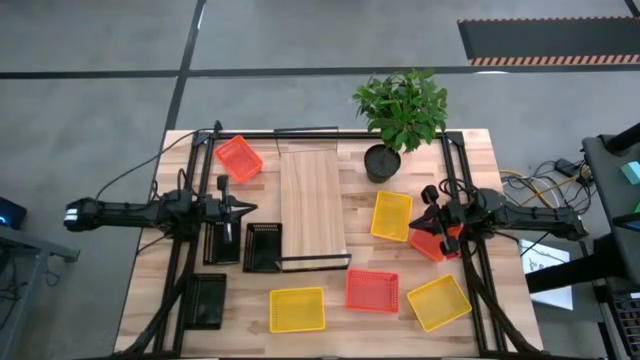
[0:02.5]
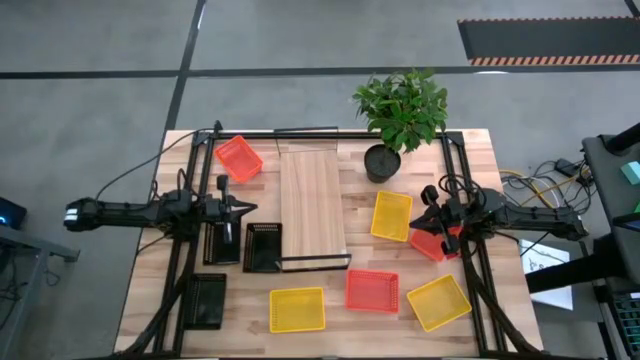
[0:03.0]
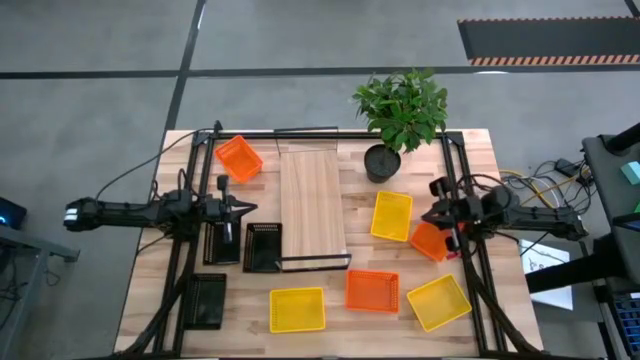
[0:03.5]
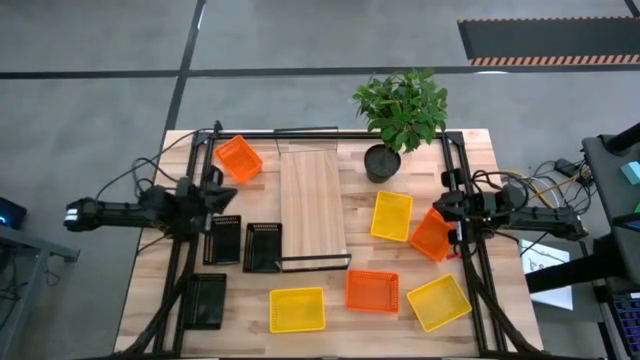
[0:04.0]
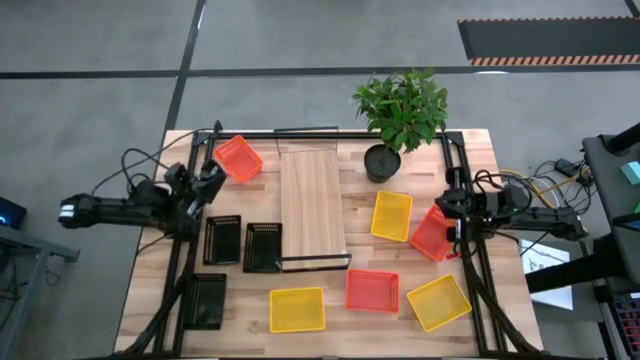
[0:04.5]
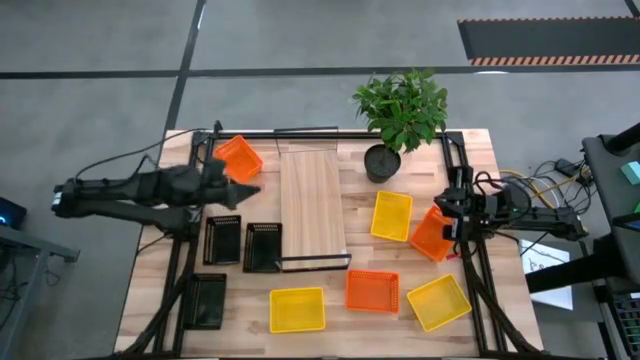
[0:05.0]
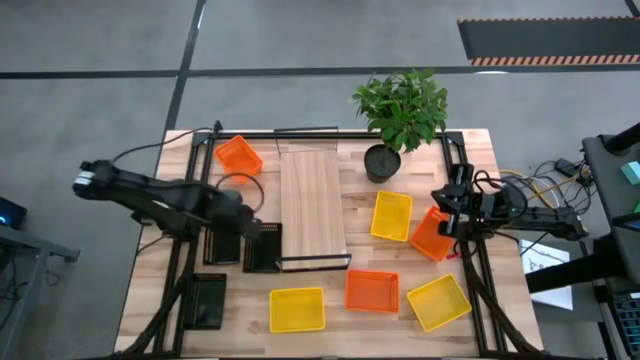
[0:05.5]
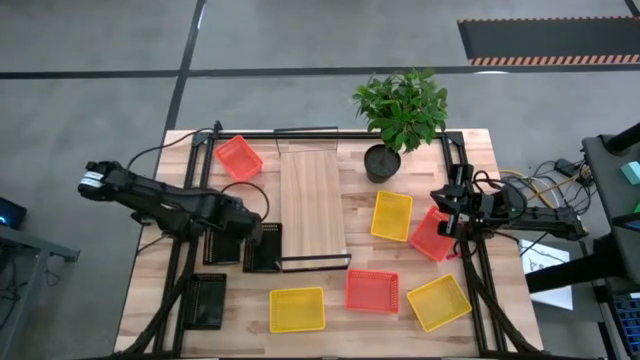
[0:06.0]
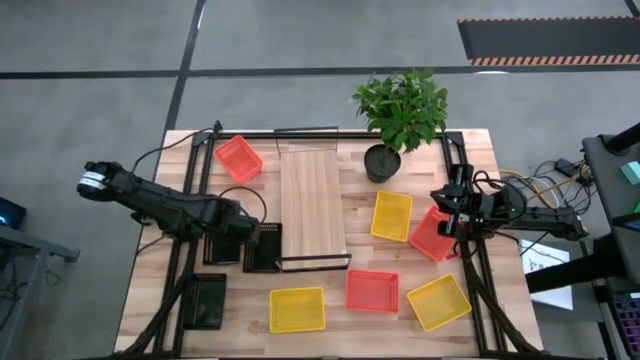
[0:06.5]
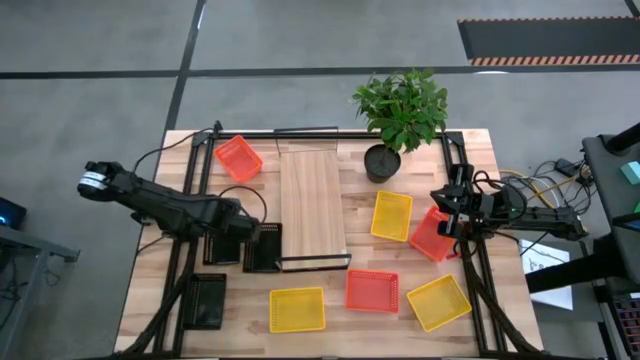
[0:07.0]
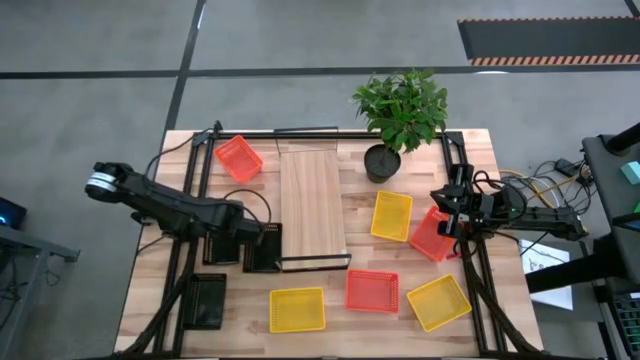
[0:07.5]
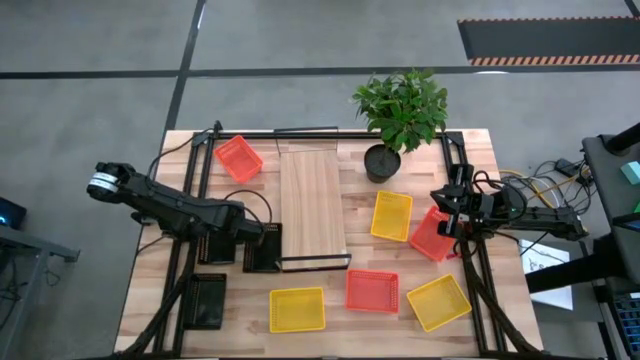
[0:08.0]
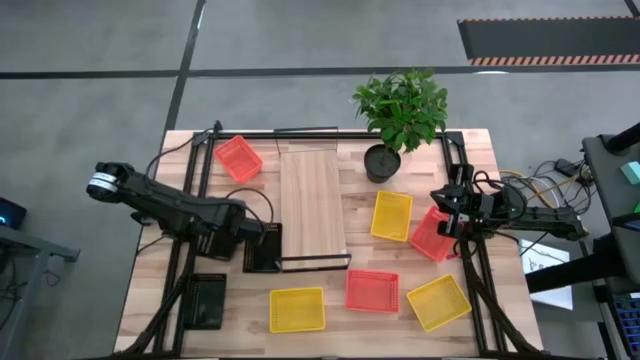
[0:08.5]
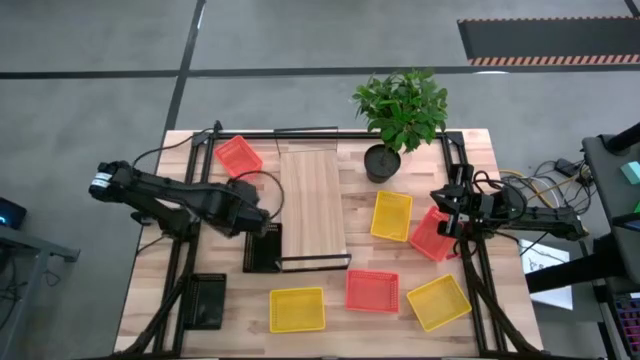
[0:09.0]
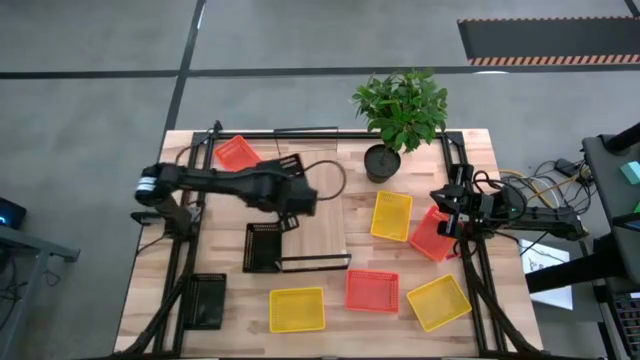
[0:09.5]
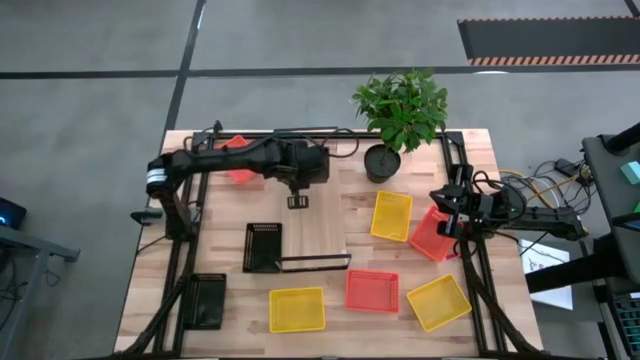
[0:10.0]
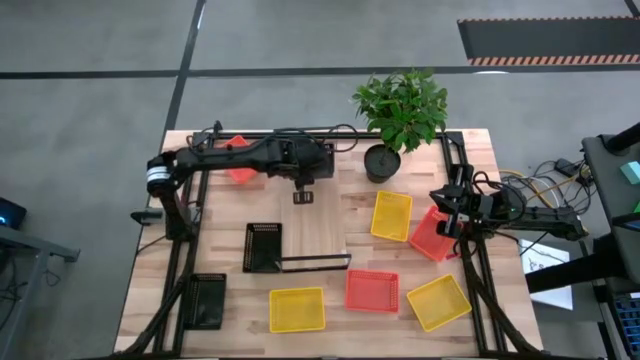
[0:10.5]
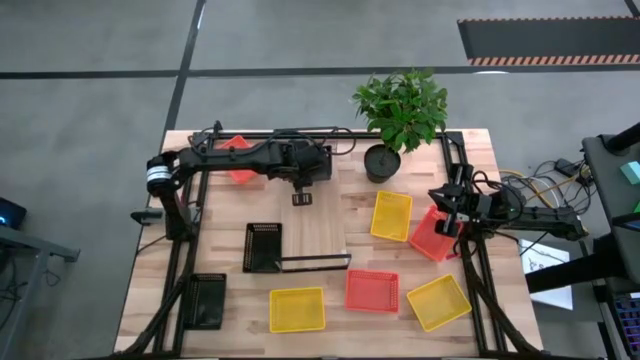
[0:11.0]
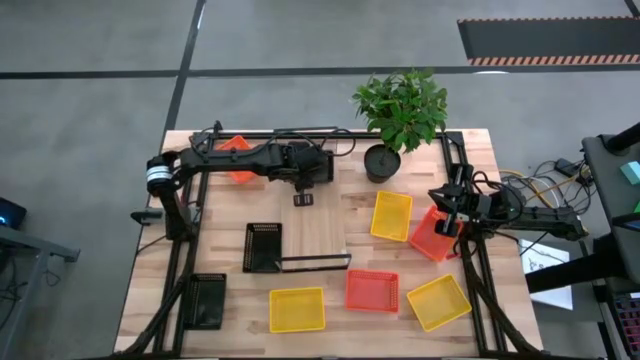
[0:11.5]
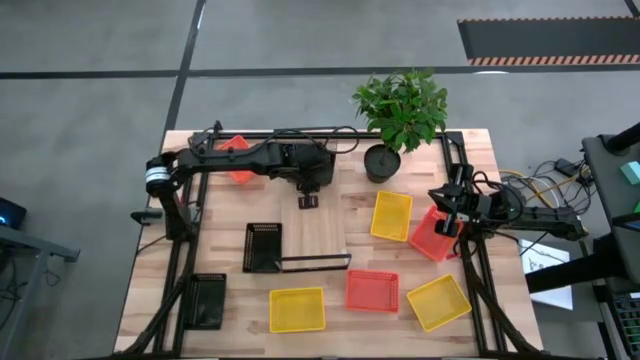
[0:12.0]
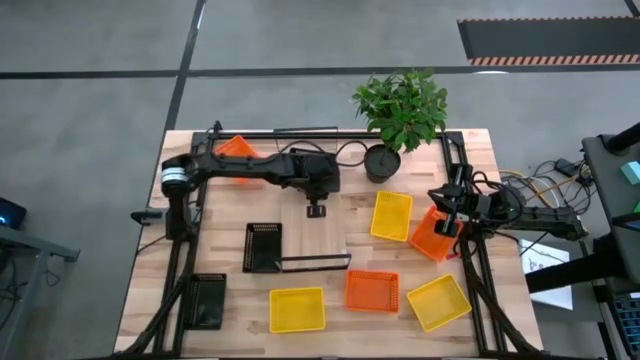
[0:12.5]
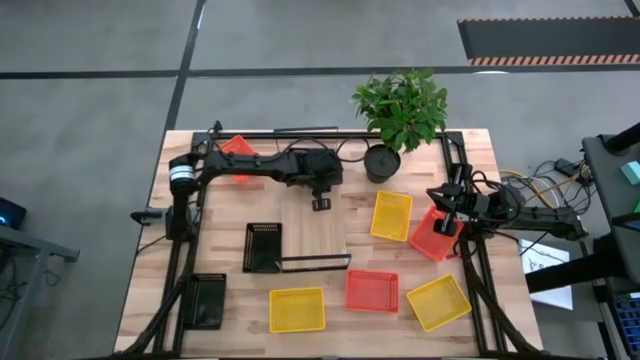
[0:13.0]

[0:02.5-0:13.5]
Task: Stack baskets on shelf by color
Put the top left black bin on the shelf

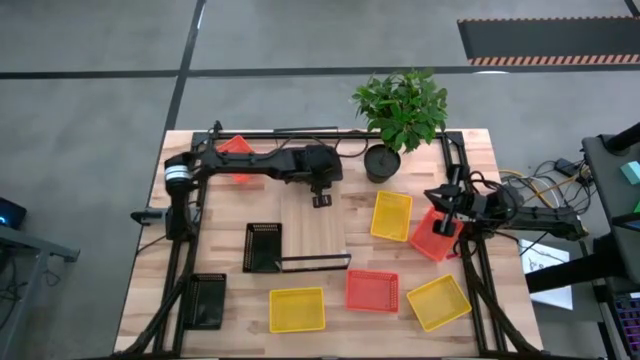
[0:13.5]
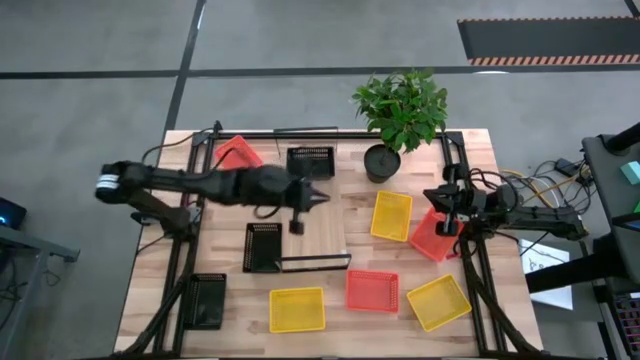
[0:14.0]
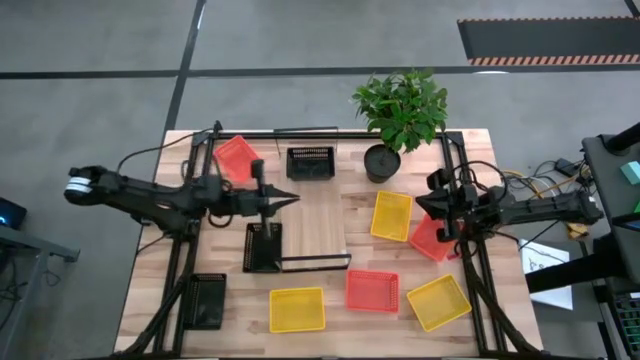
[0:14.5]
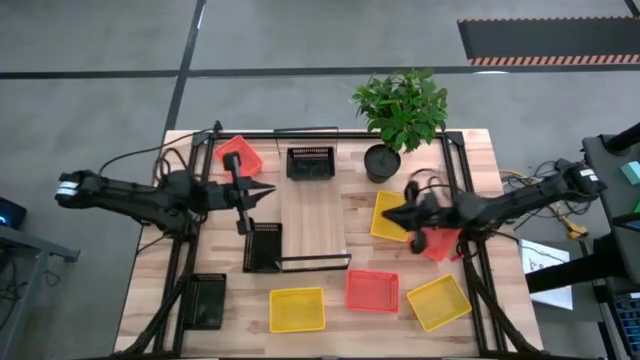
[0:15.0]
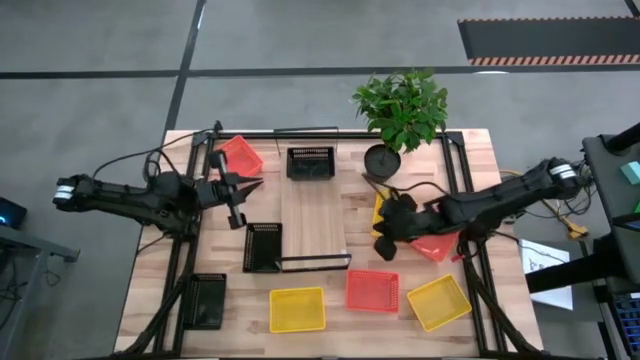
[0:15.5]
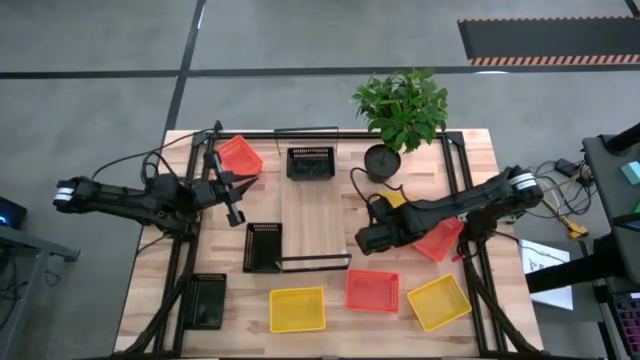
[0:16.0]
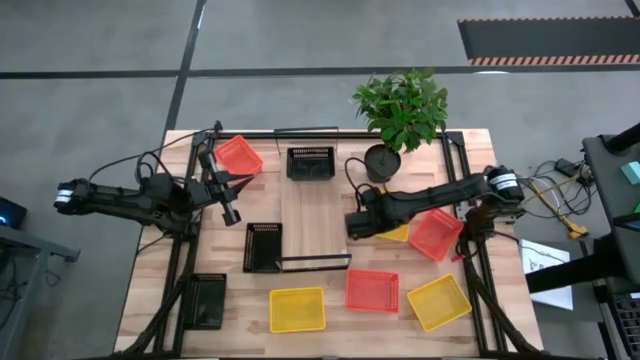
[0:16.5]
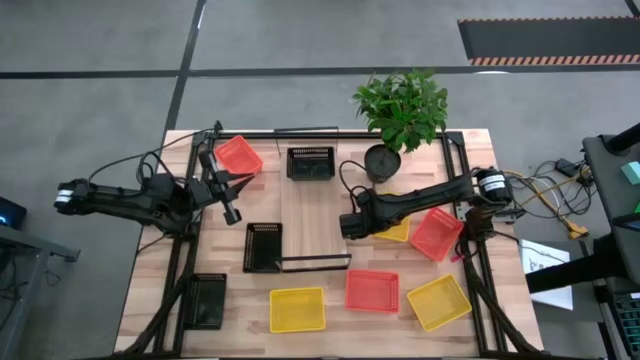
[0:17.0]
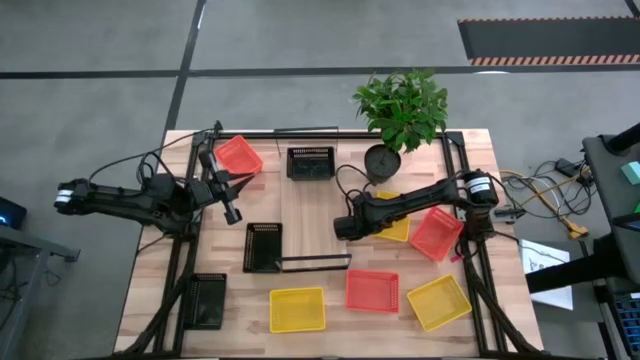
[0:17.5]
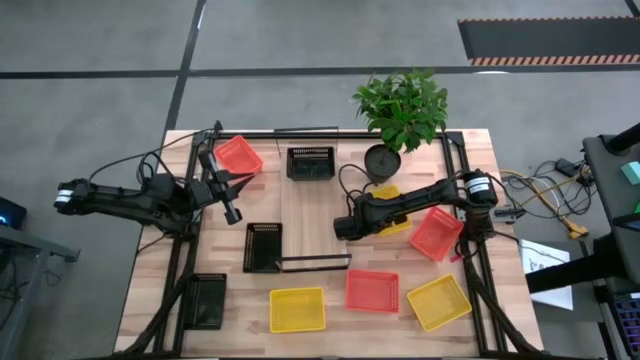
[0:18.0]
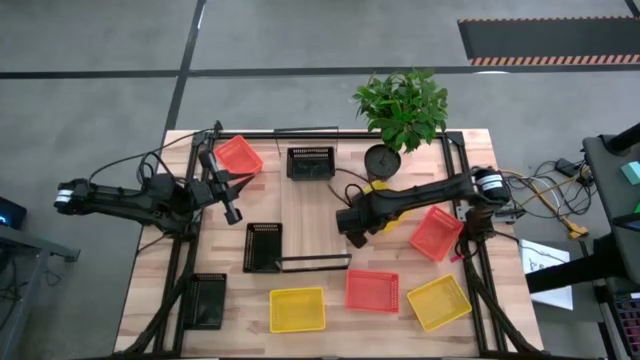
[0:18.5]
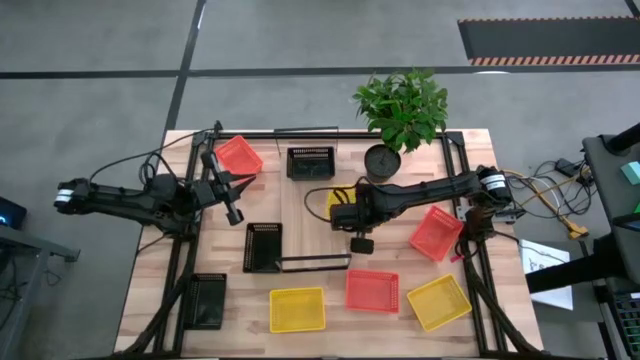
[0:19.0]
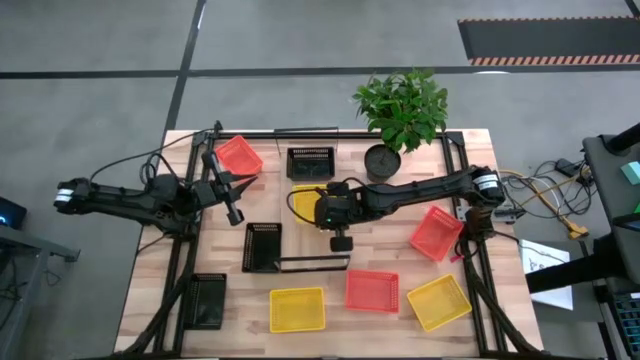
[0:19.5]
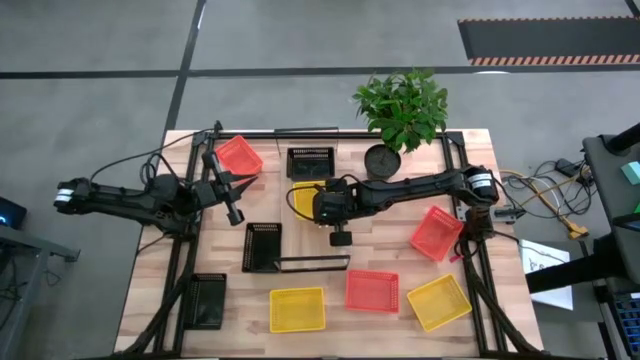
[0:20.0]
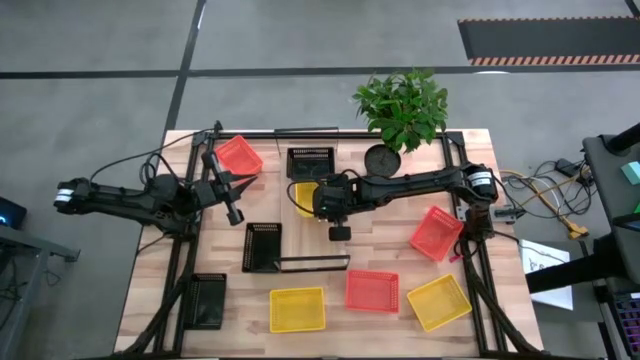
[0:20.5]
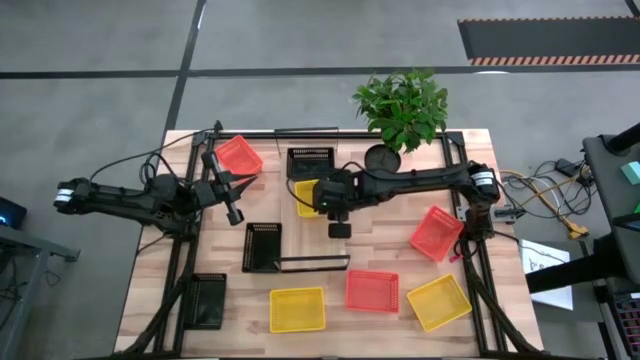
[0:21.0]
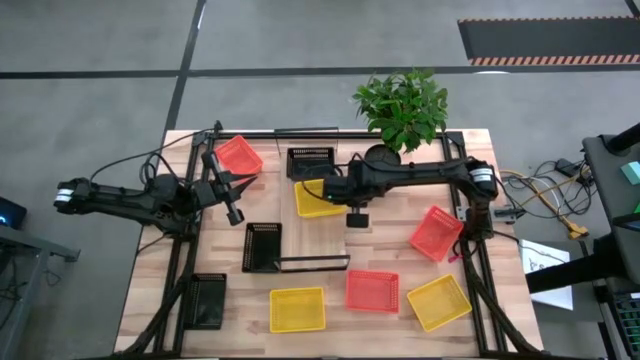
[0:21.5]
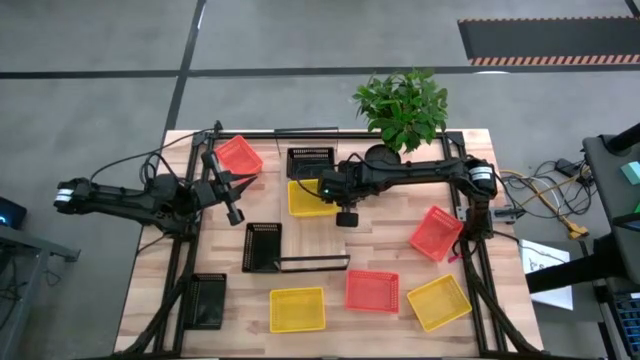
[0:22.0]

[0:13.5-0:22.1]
Put the top yellow bin on the shelf

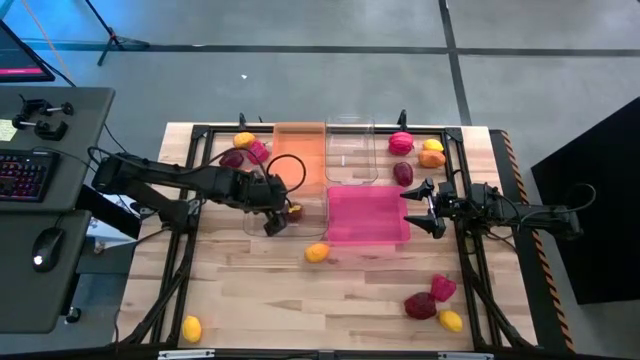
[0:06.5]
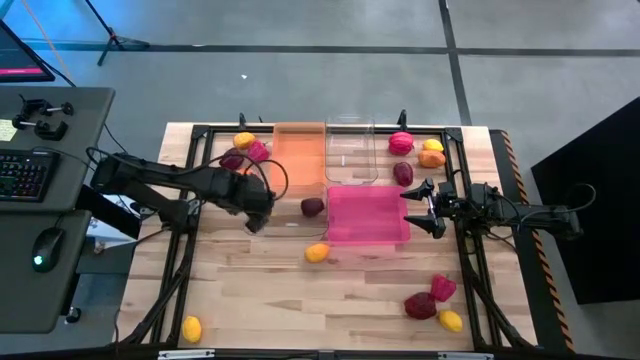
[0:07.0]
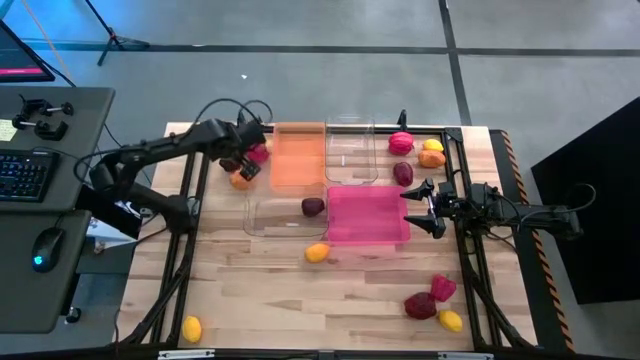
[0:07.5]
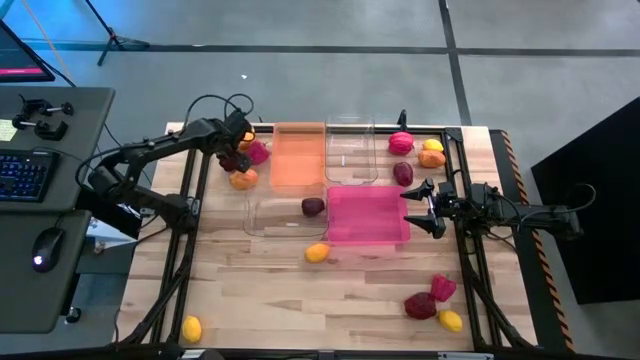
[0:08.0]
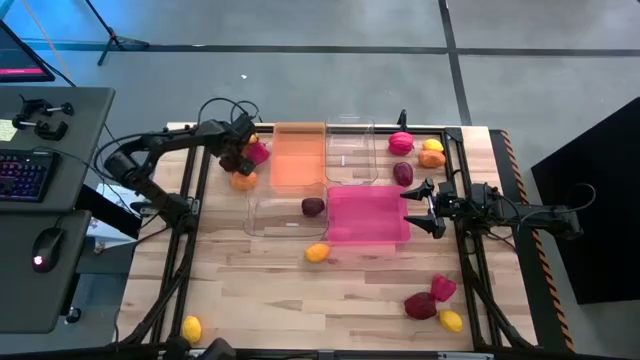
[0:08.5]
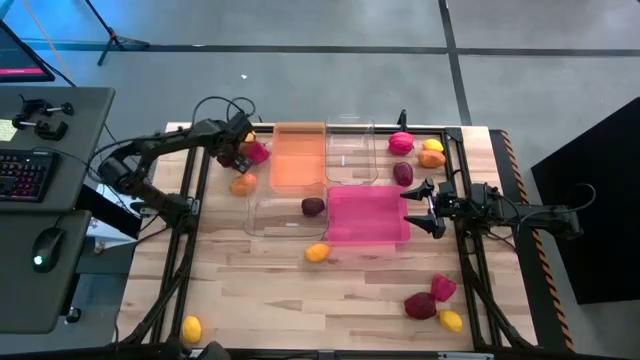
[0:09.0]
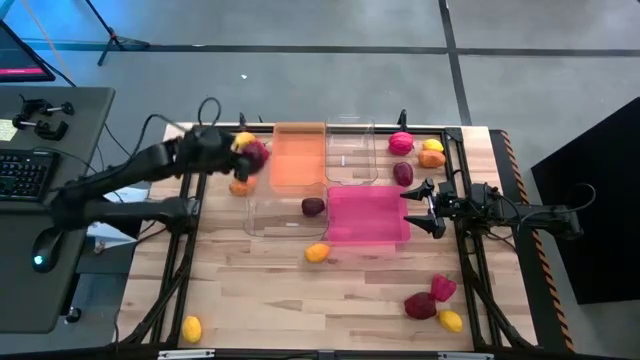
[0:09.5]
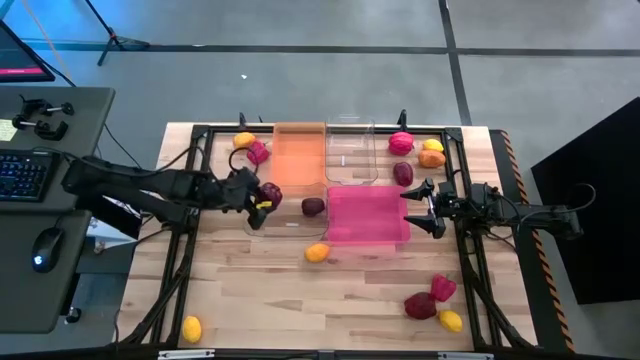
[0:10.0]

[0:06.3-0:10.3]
Task: Sort produce into baskets
Put the apple into the bottom transparent bin
